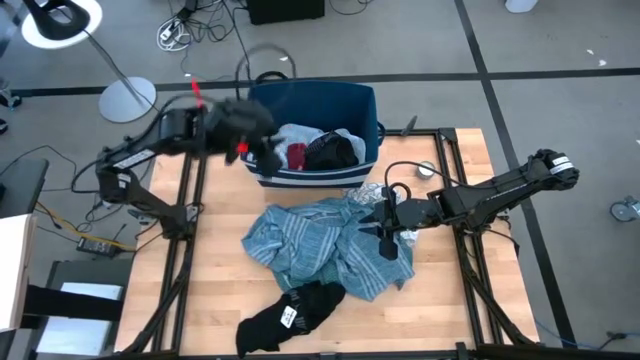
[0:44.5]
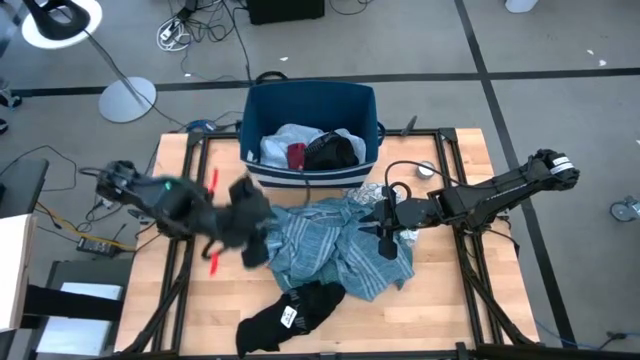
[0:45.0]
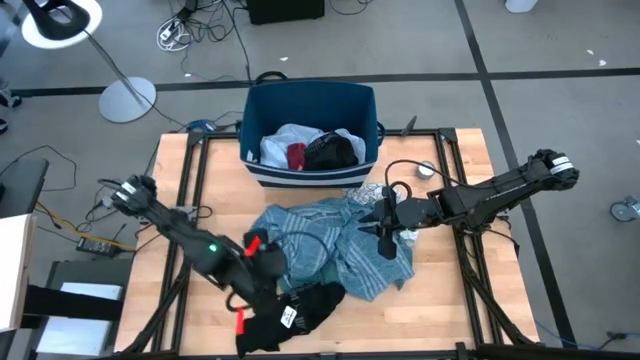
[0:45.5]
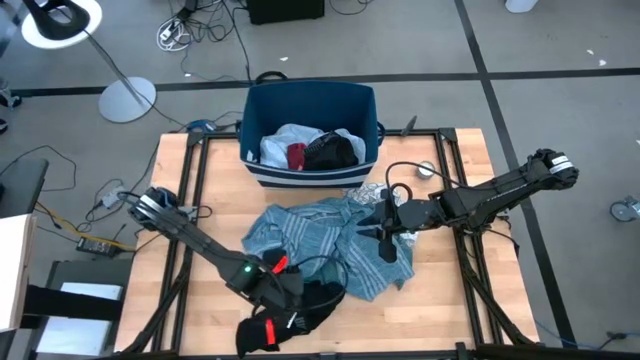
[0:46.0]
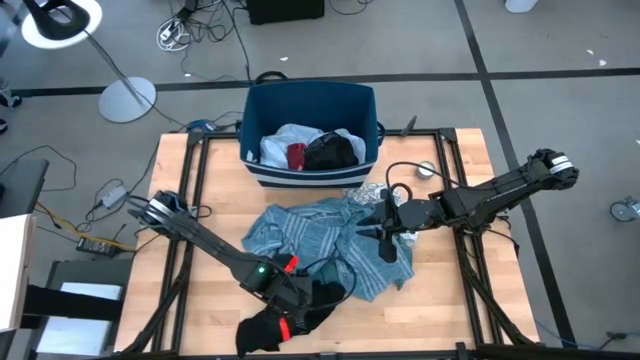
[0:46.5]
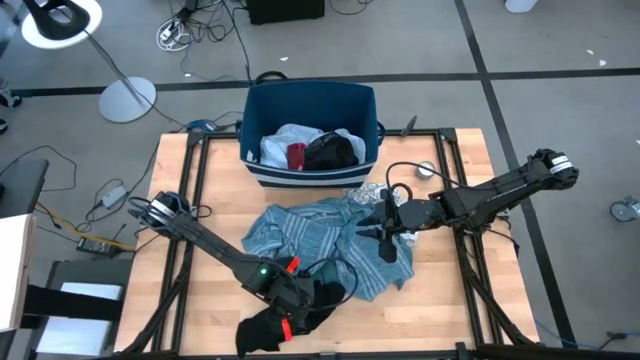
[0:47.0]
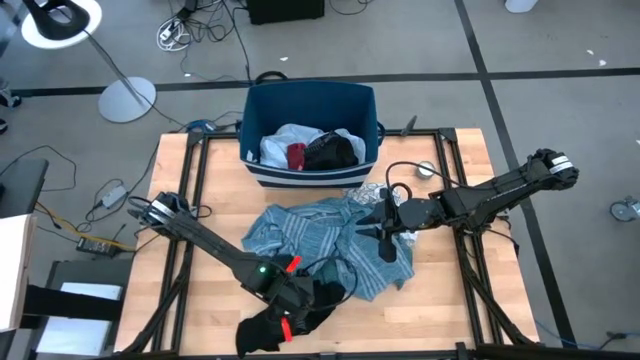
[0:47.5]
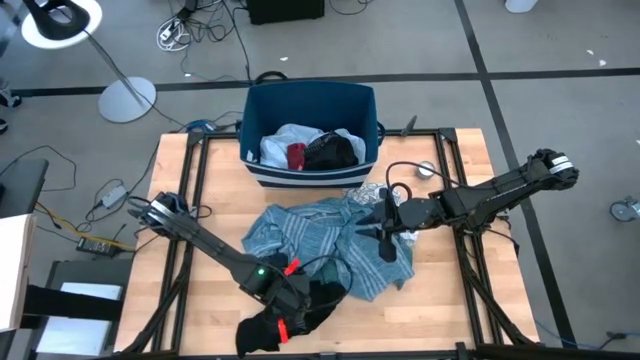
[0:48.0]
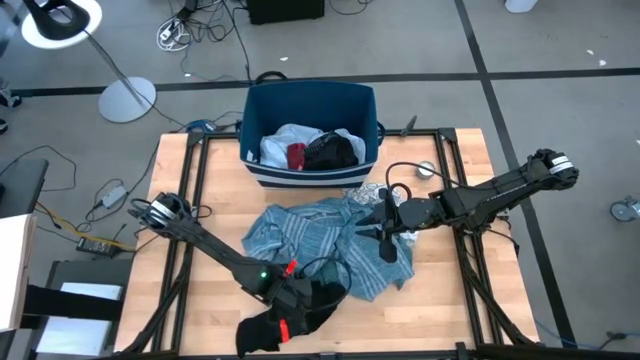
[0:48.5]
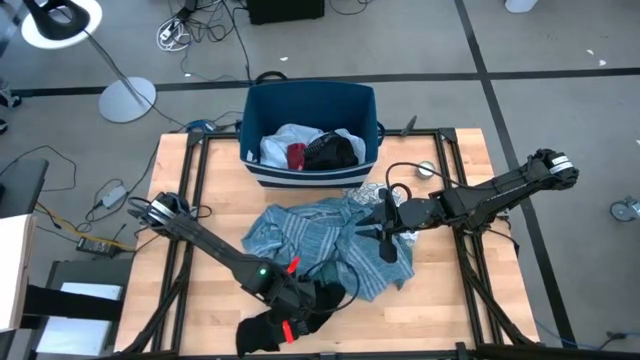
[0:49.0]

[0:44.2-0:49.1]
Task: Sort clothes
Put the black boxer into the blue laundry organizer

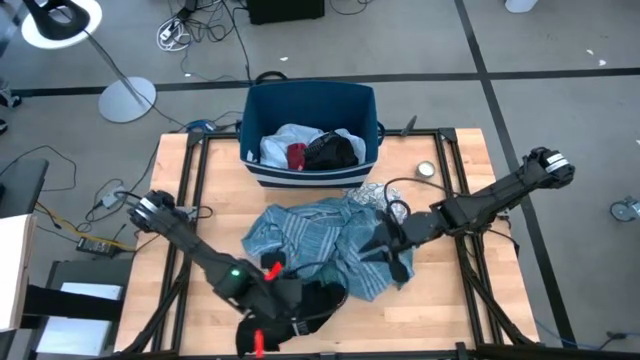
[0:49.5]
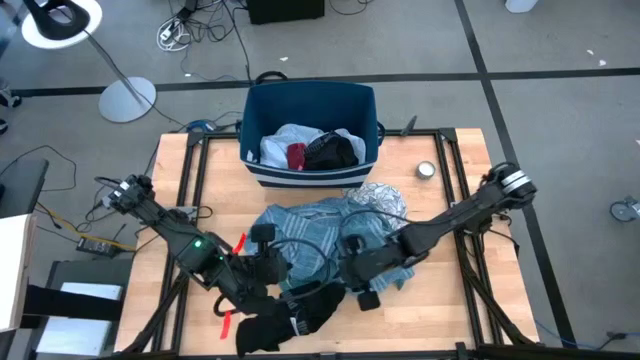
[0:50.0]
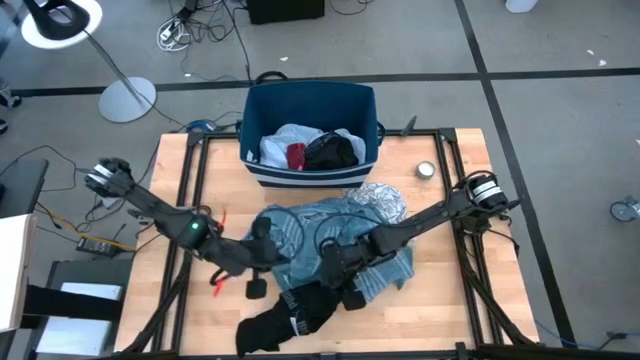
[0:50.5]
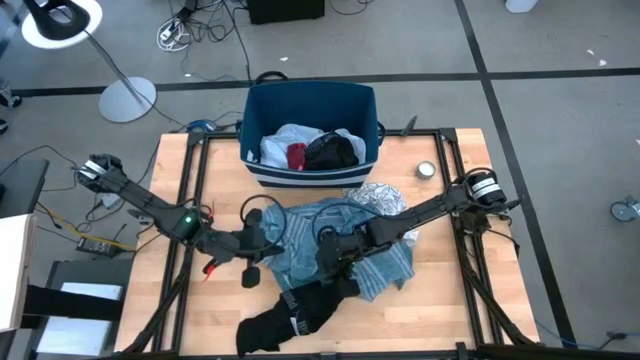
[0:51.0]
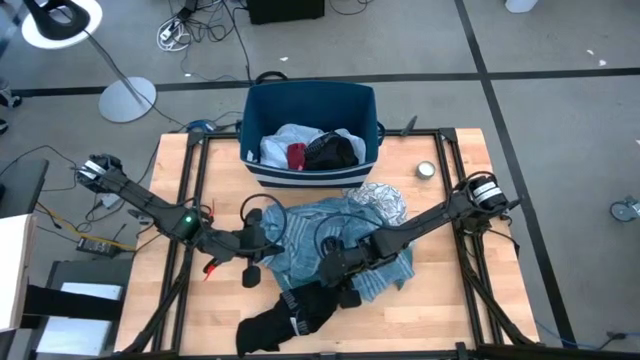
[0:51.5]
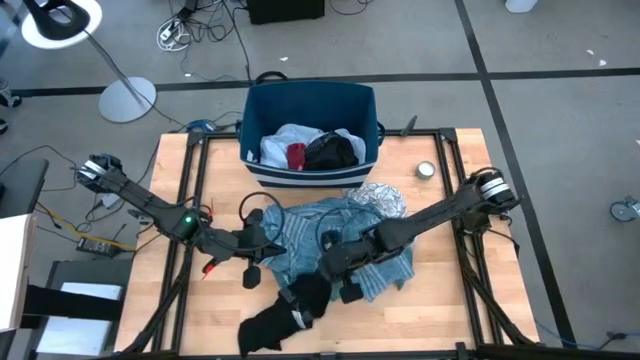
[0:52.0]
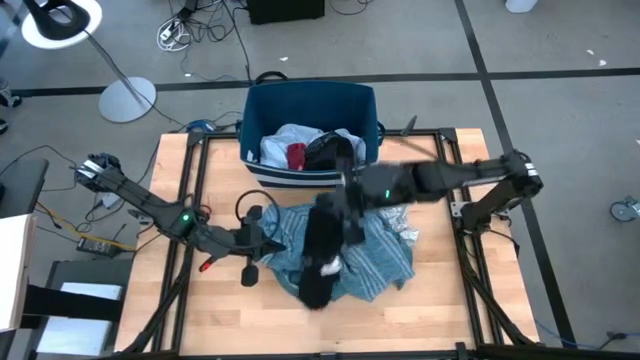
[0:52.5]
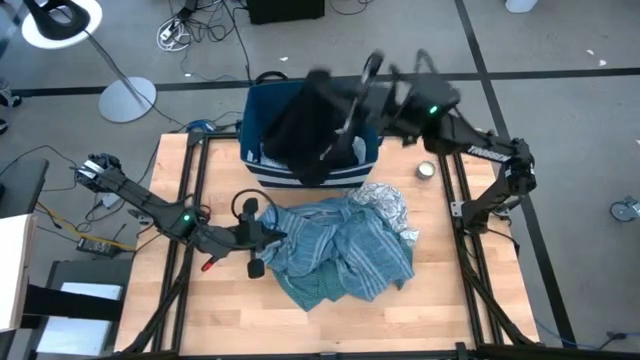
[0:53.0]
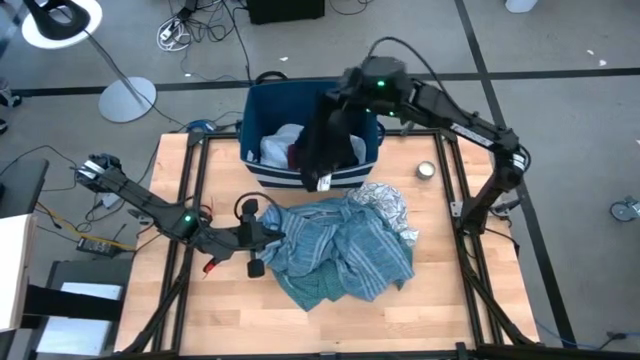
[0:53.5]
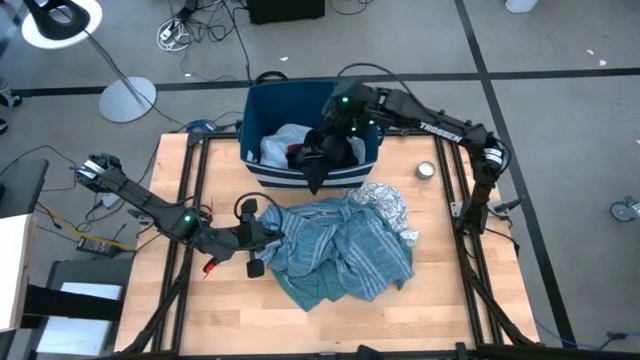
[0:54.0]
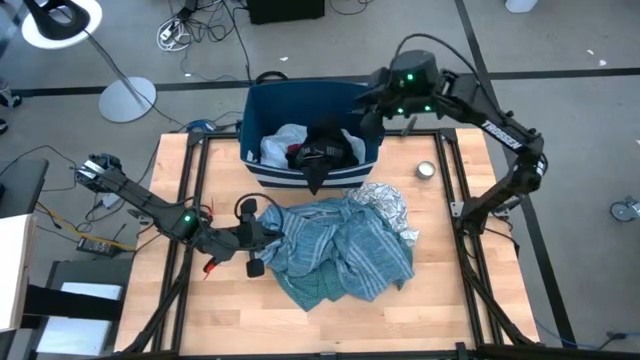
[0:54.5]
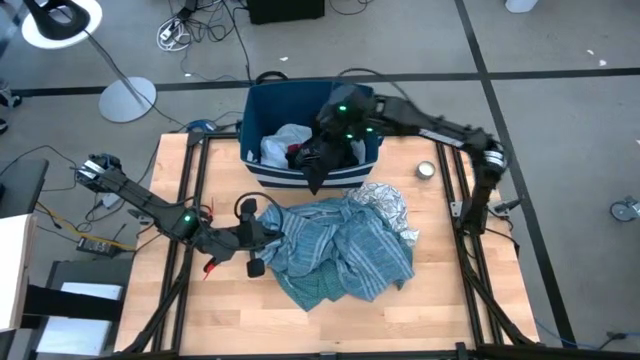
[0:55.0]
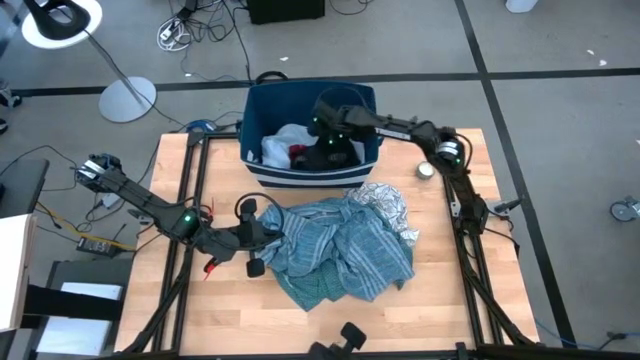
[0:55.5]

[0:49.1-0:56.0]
Put the black shorts into the blue laundry organizer

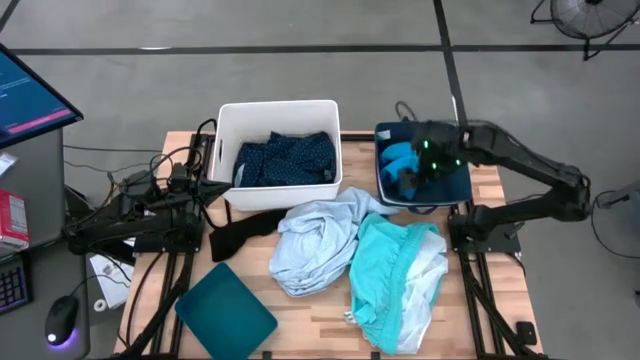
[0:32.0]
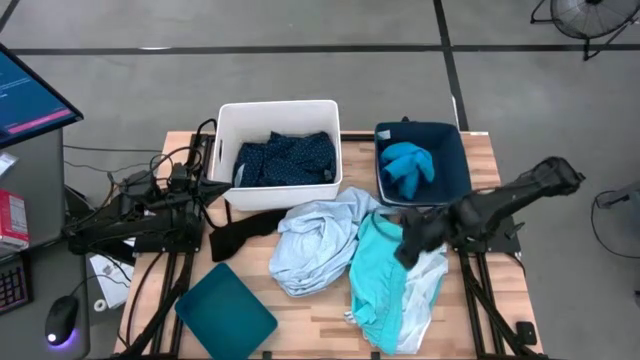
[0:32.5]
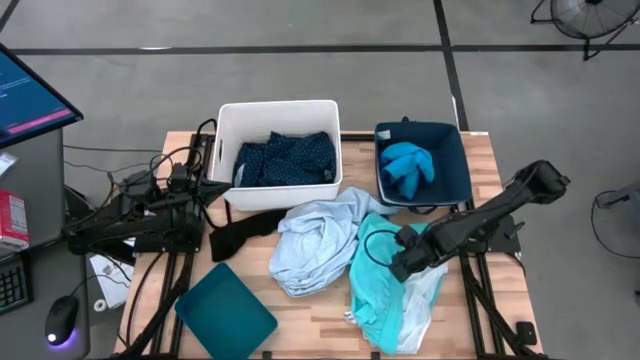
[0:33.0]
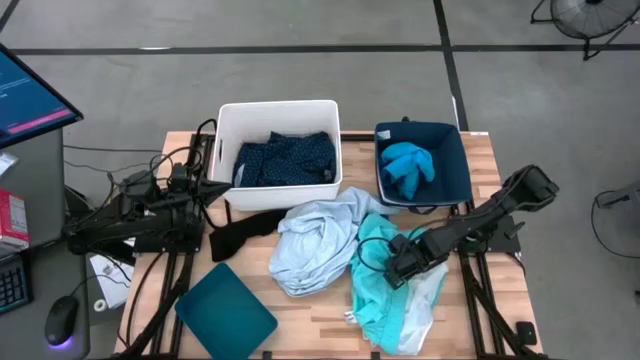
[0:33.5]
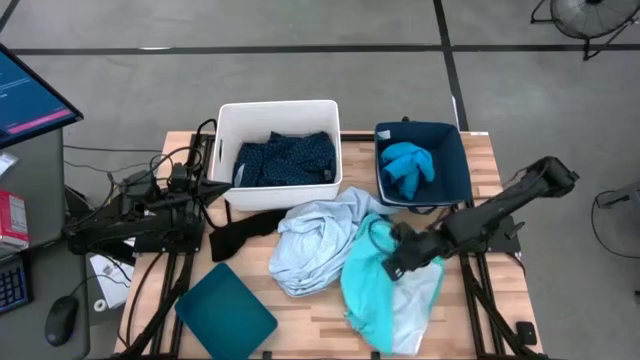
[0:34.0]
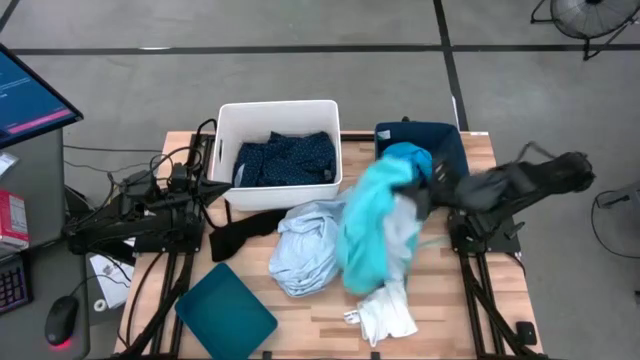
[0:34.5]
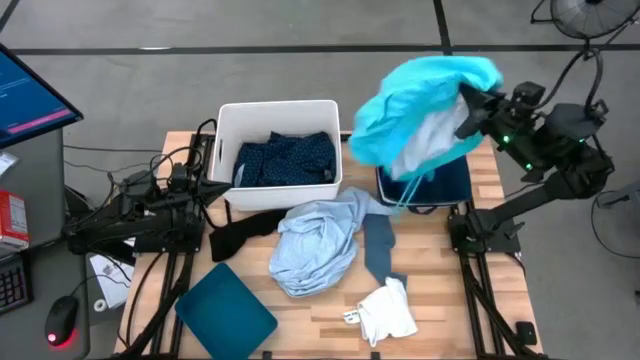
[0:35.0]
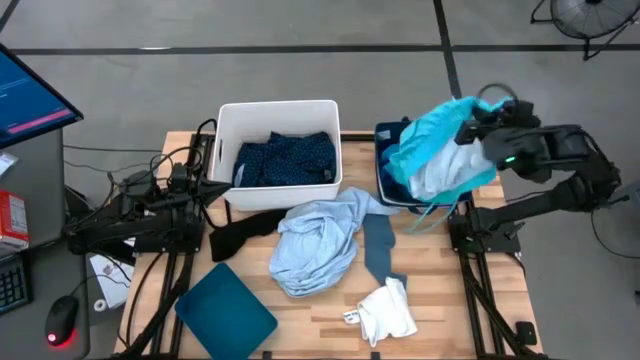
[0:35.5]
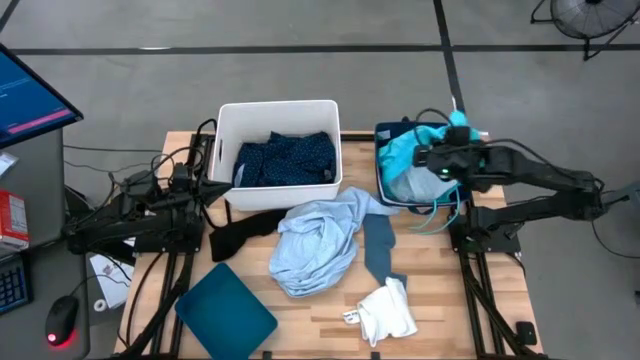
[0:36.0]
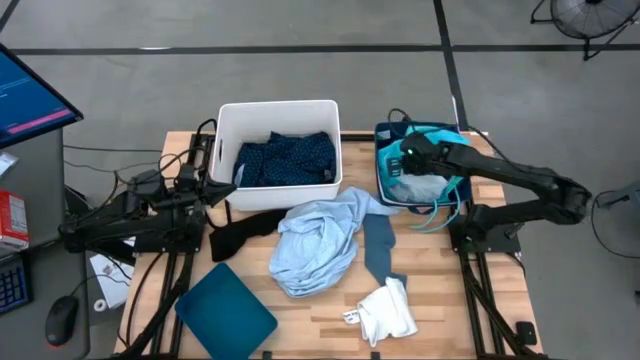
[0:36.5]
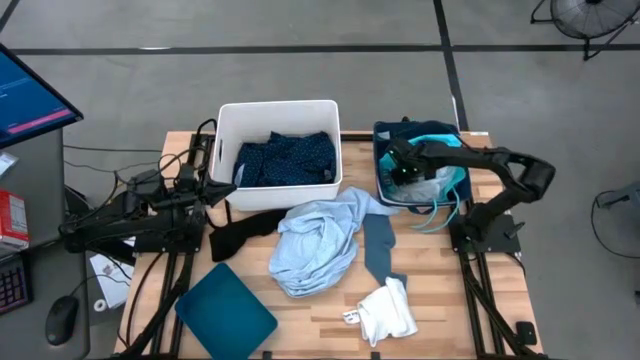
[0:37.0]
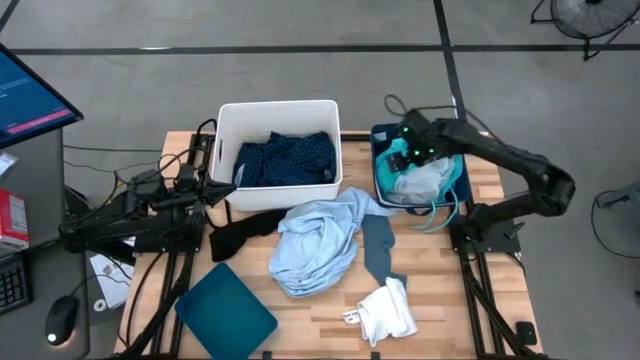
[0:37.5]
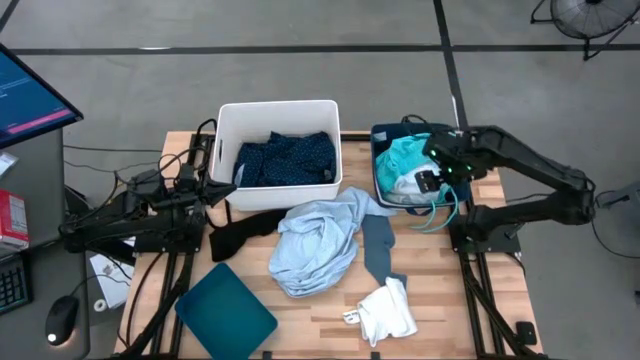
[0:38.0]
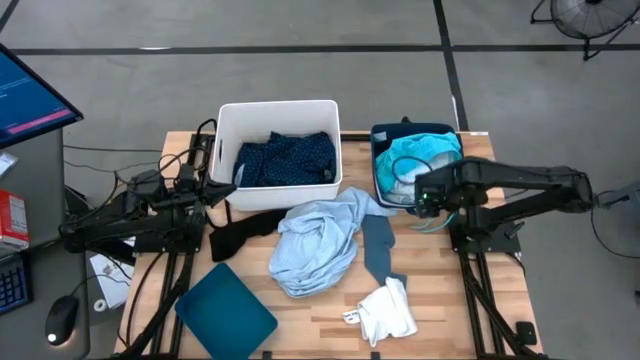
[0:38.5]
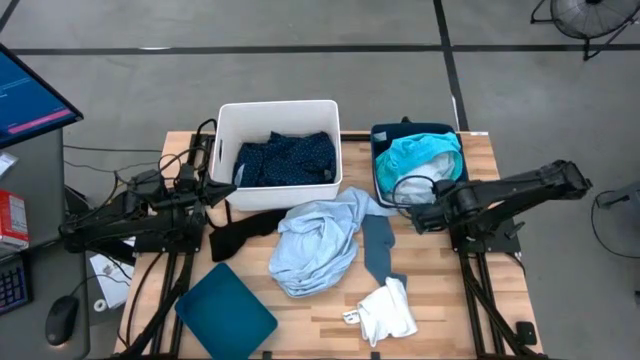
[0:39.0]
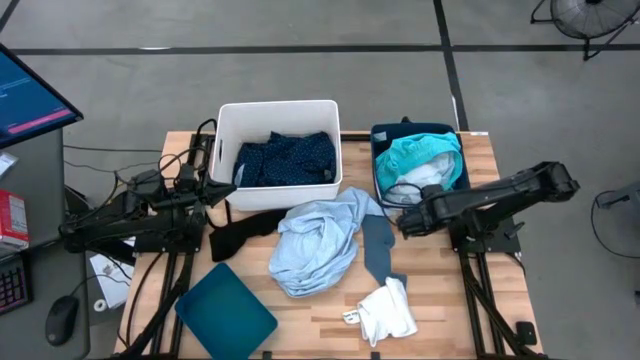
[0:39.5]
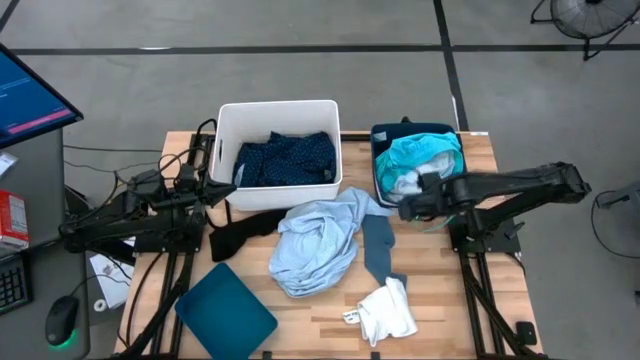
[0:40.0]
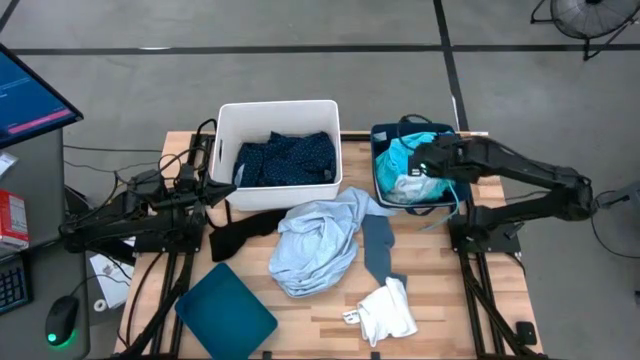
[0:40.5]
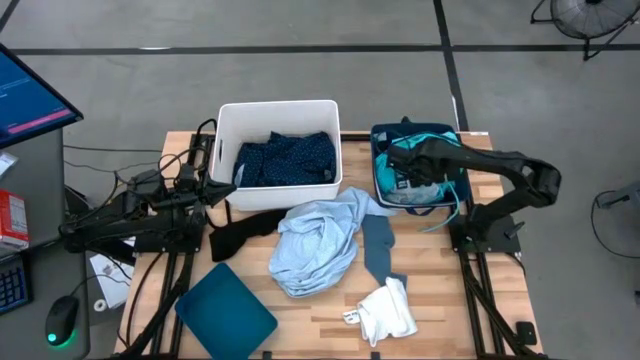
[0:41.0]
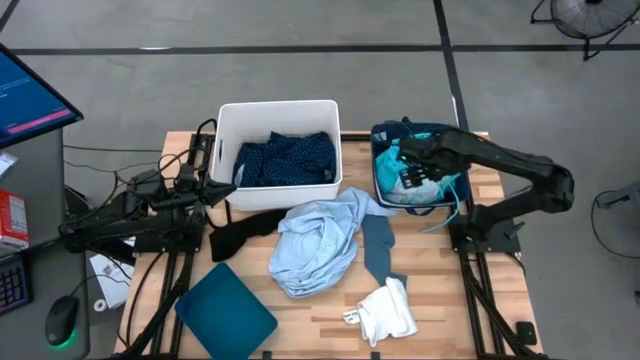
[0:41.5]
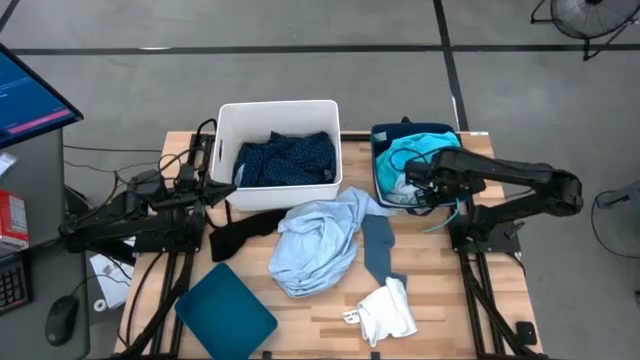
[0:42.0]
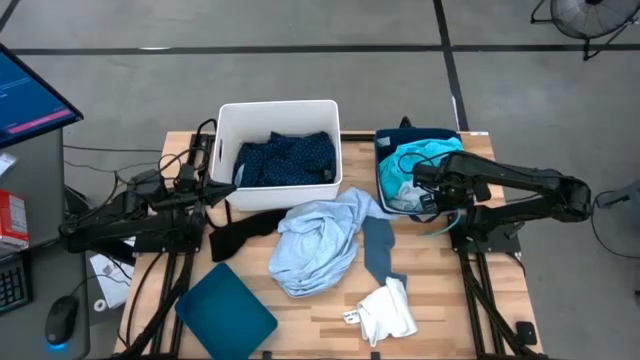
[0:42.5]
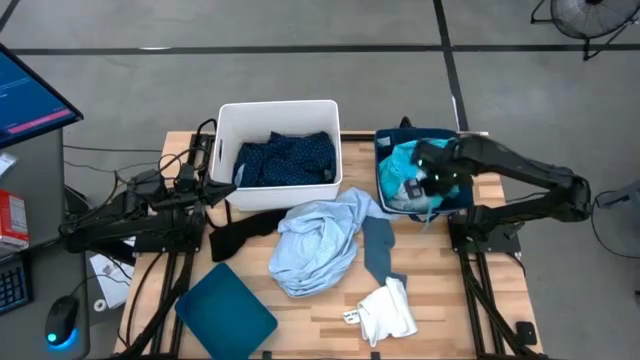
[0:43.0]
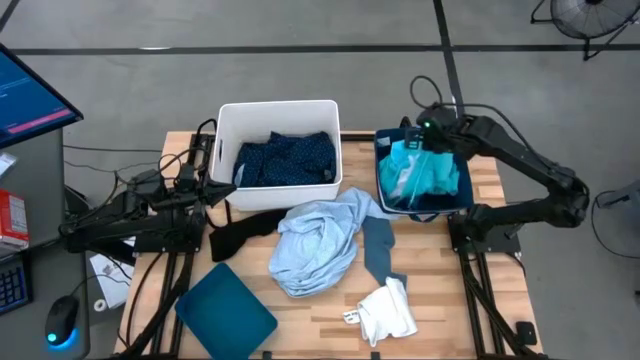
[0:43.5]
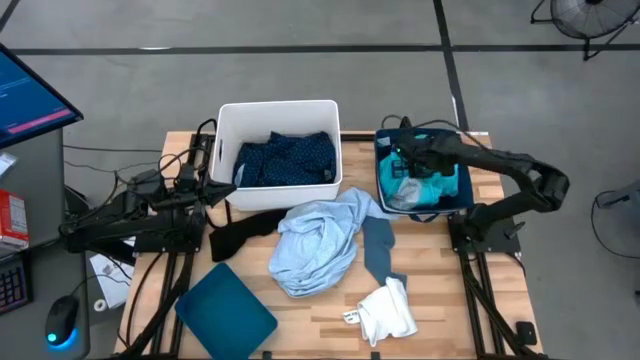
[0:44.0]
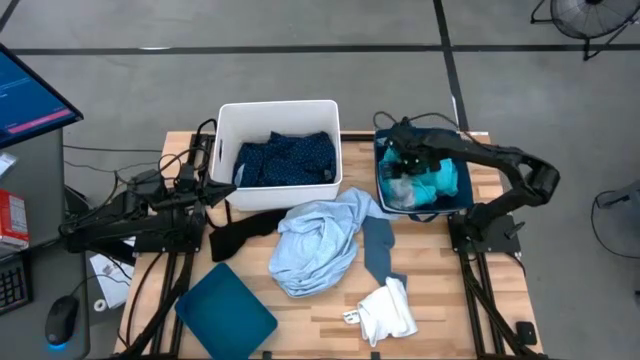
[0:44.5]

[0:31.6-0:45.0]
Task: Pick & Place Cloths
Put the light blue shorts into the dark blue laundry organizer
